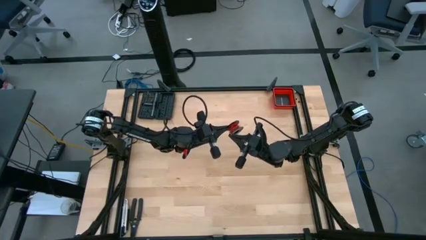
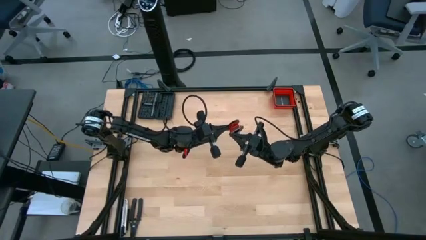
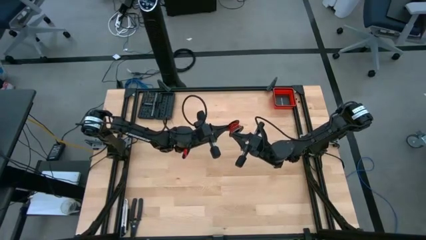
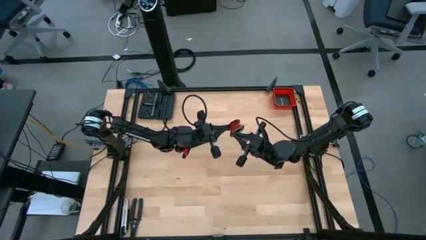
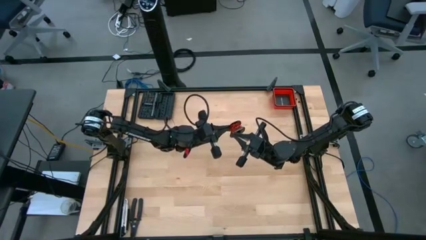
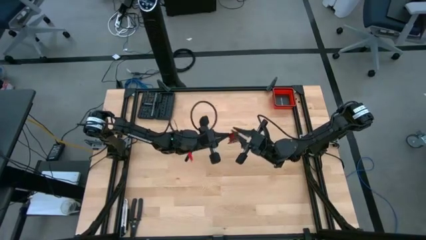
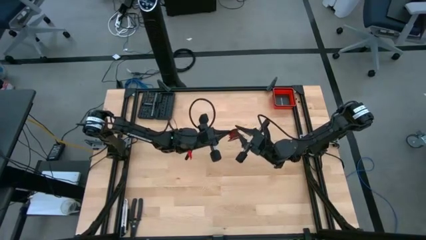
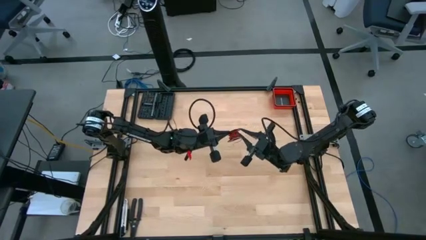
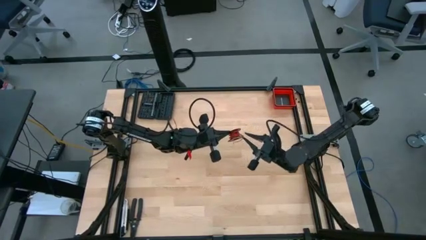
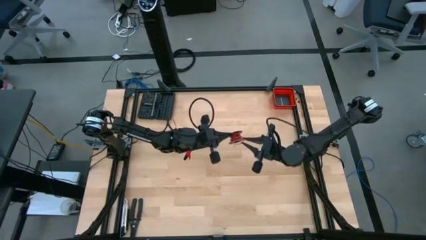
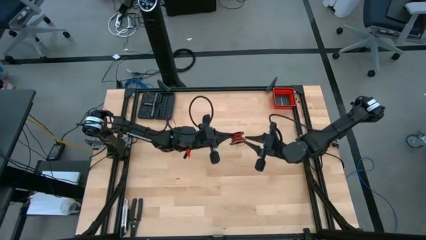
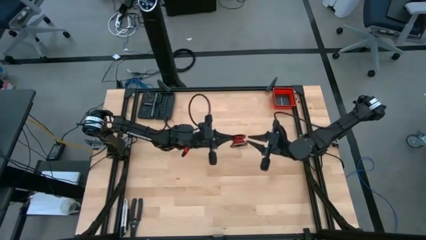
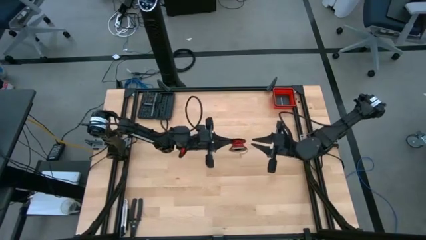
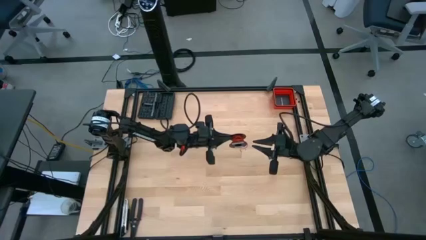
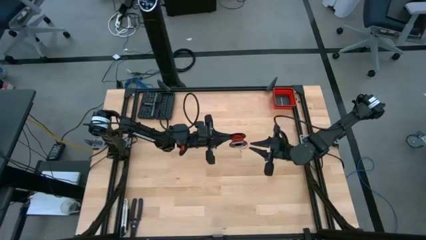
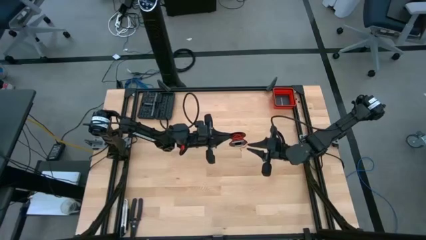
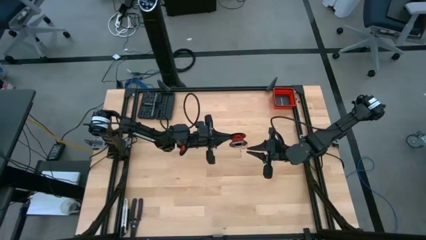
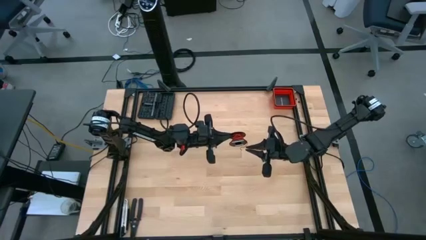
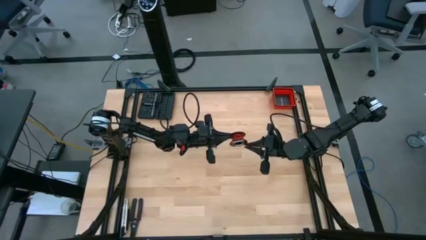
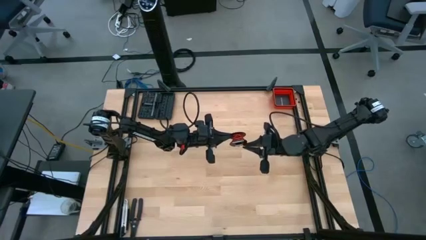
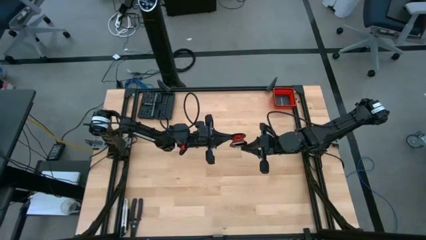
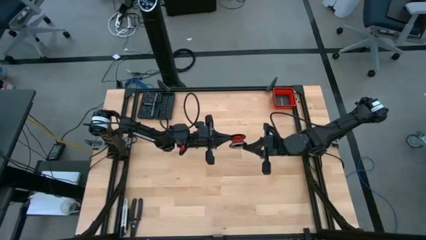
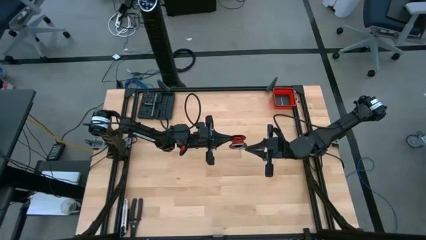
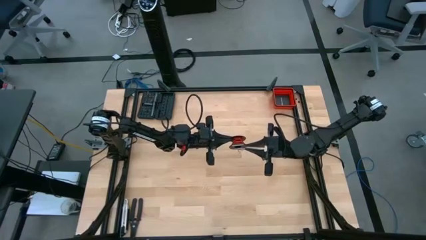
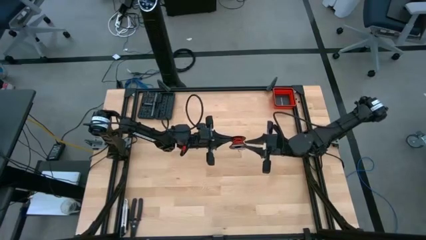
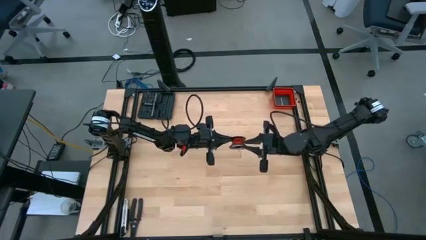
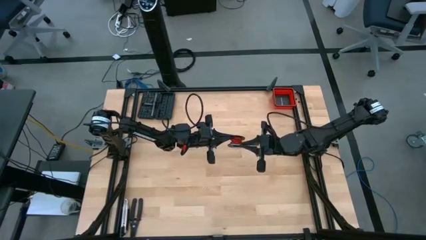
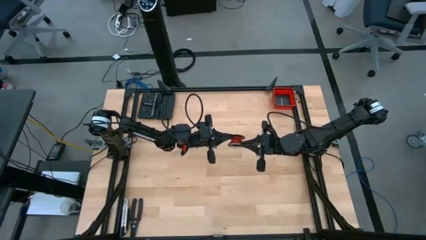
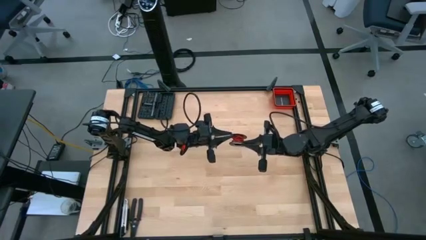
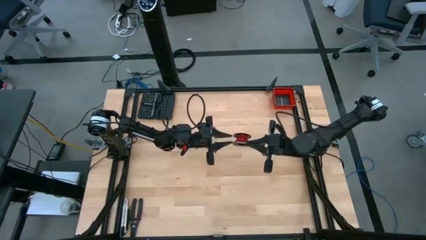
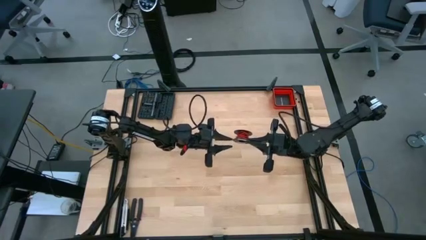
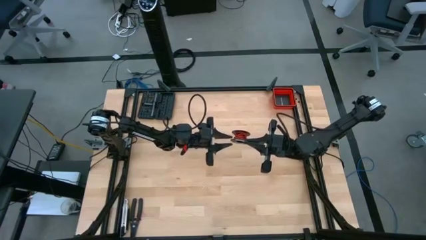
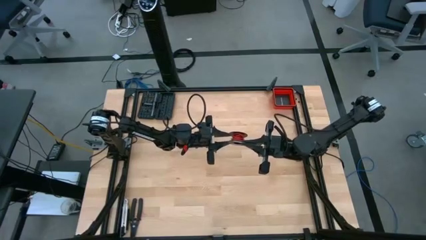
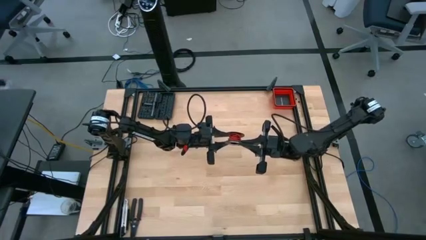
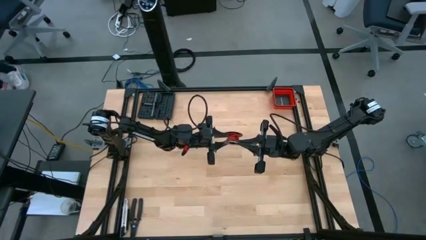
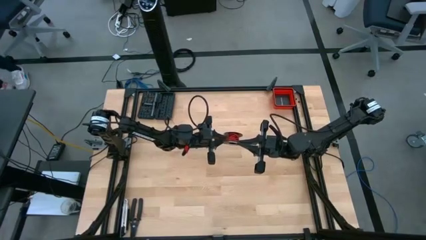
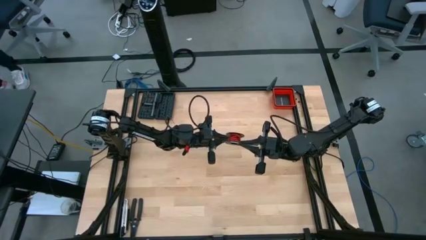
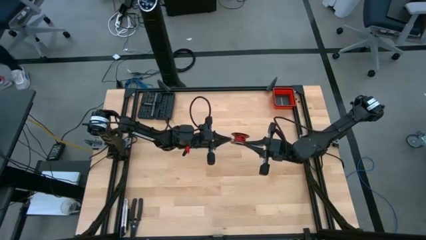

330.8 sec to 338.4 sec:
Task: Coil cords
Coil the red wire on the black spool

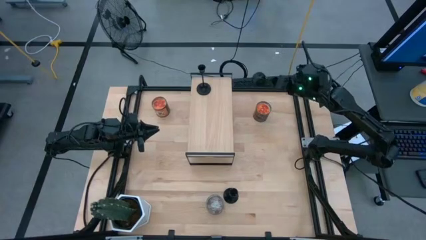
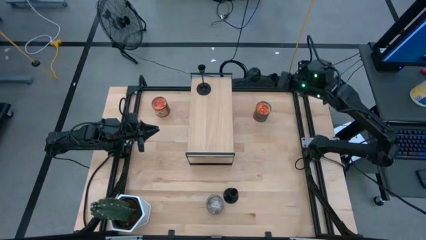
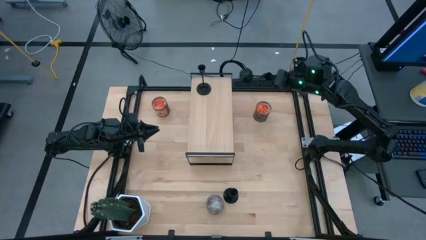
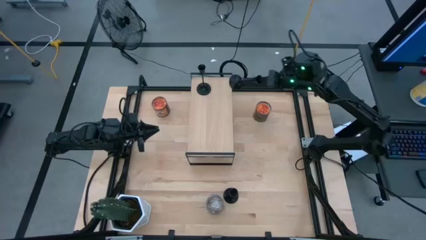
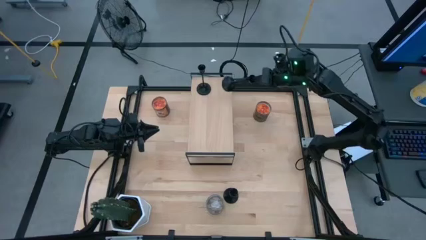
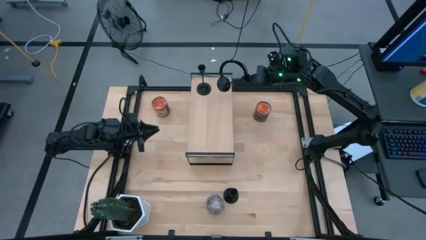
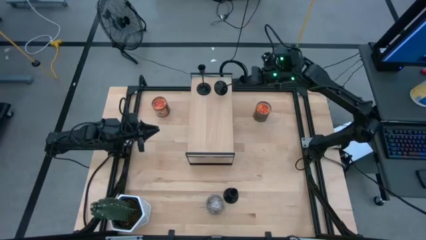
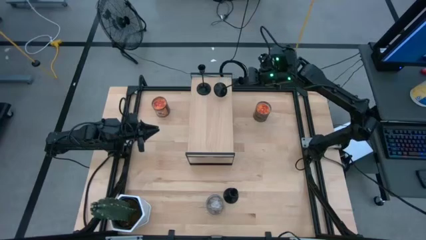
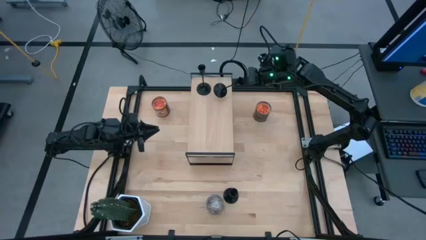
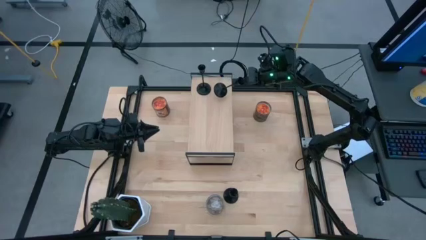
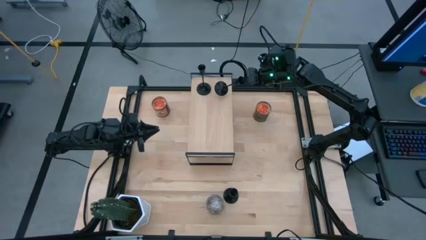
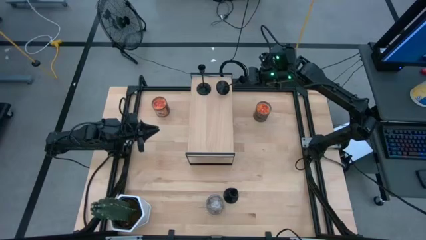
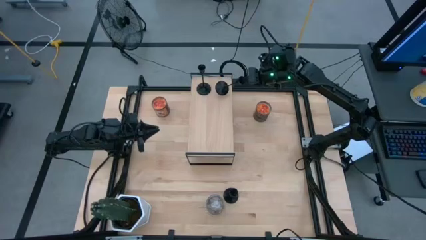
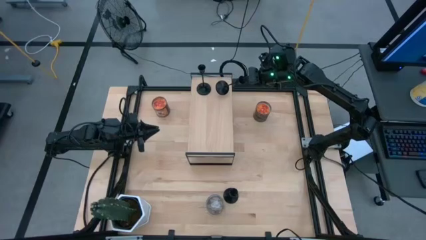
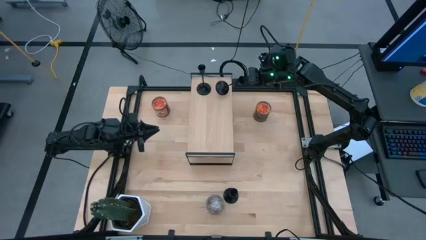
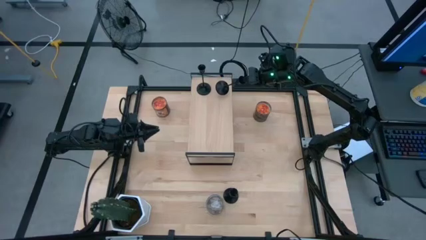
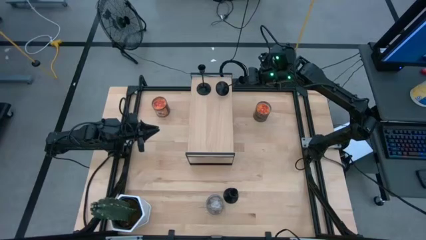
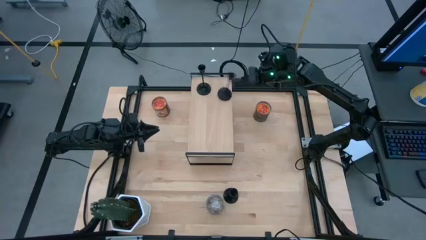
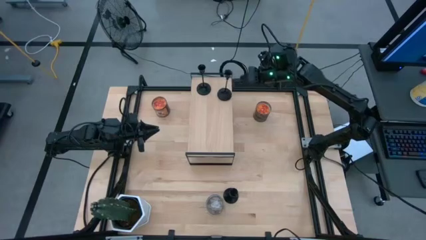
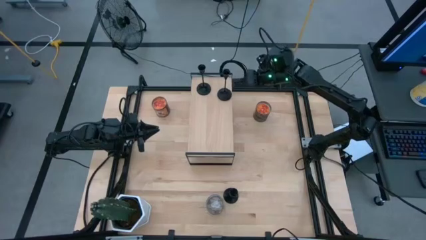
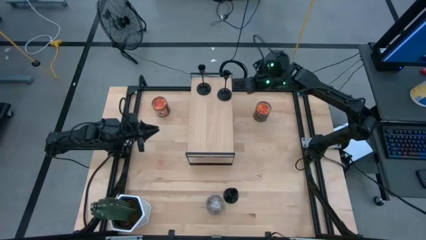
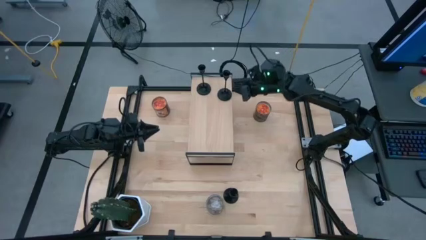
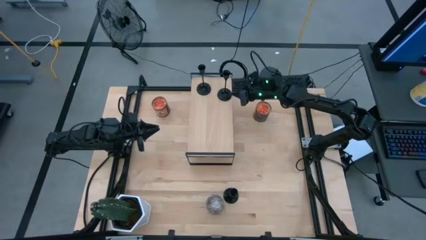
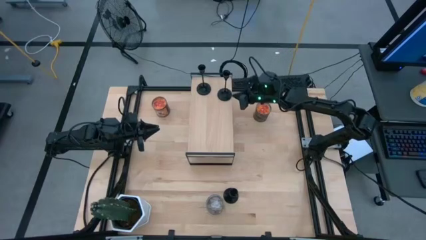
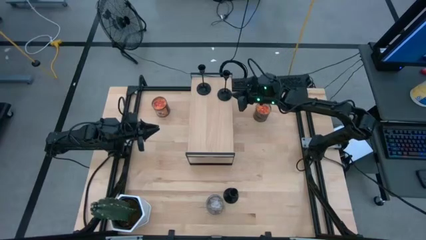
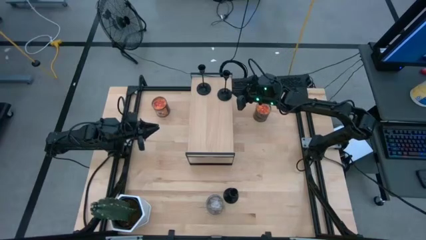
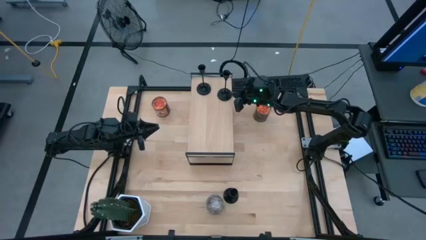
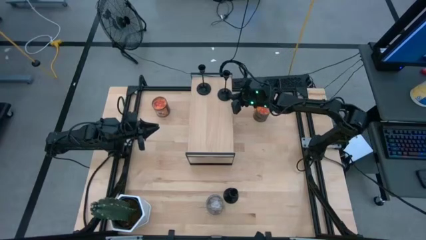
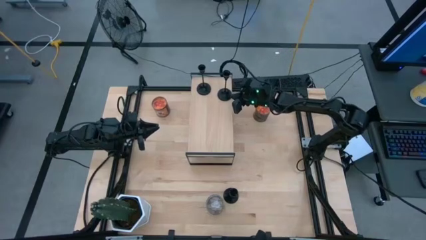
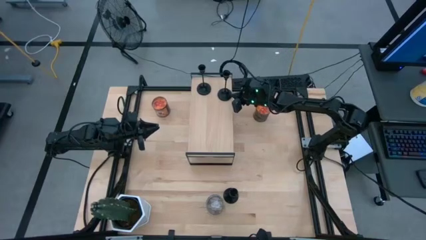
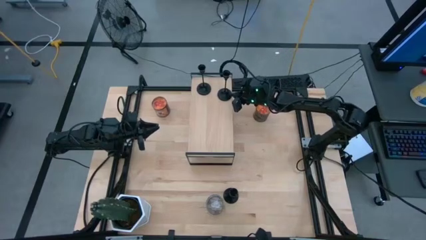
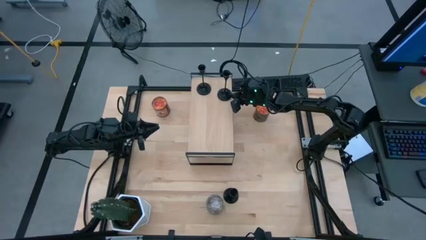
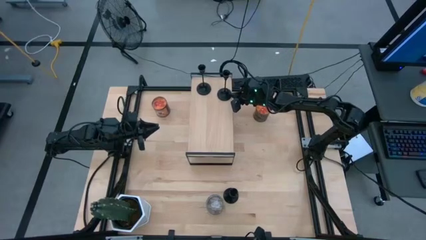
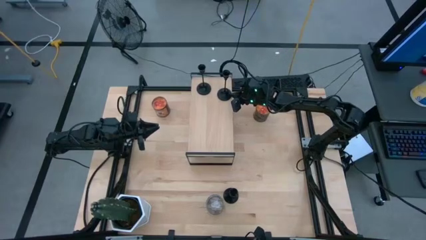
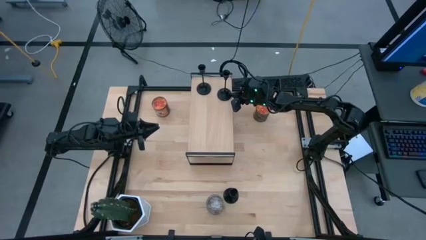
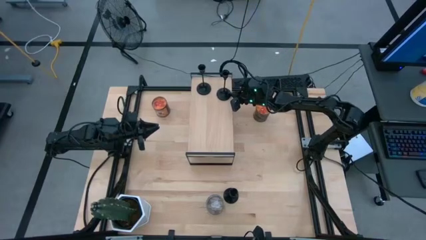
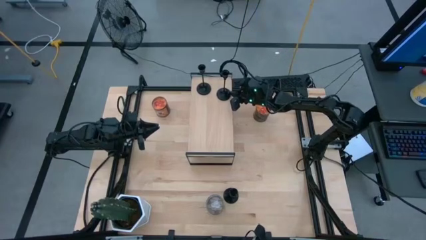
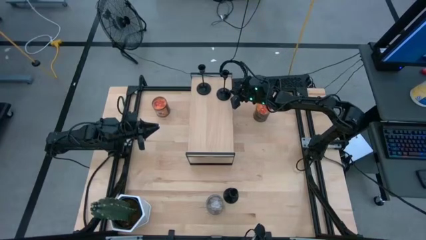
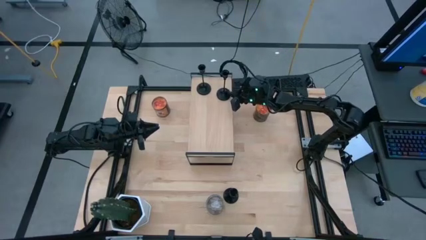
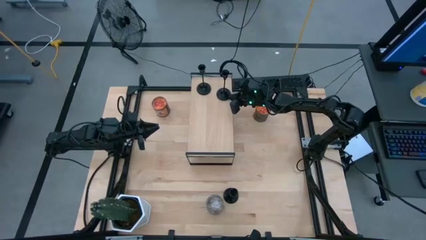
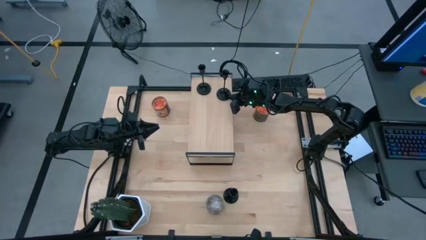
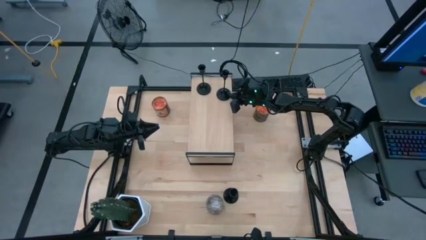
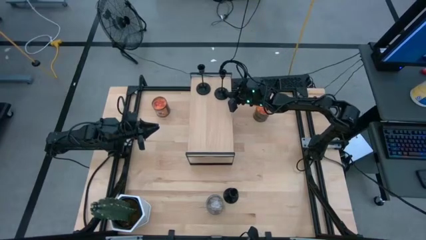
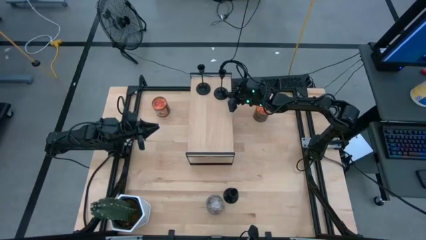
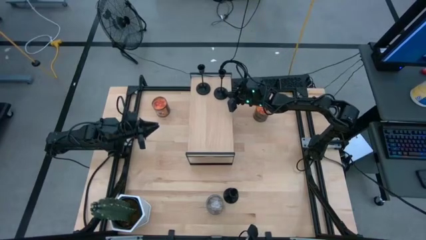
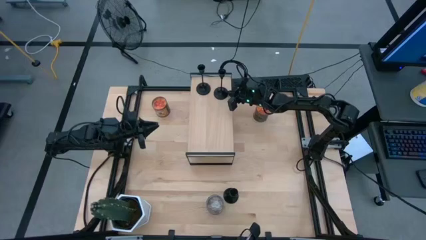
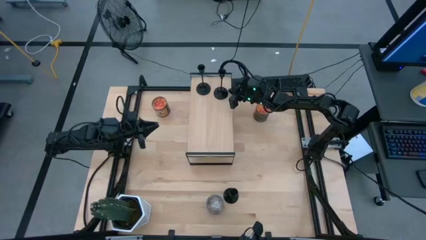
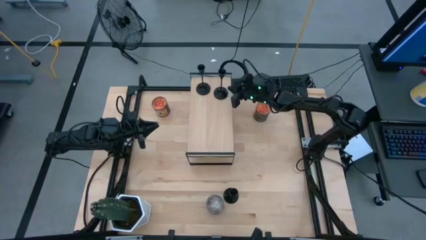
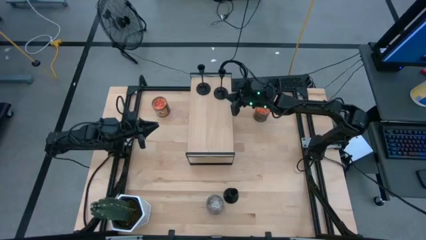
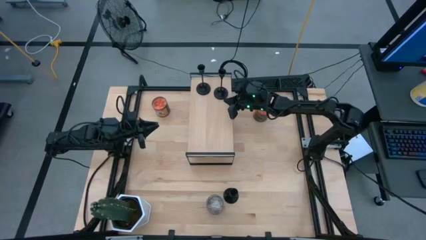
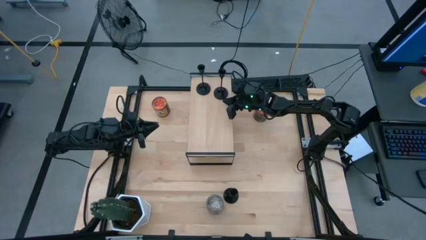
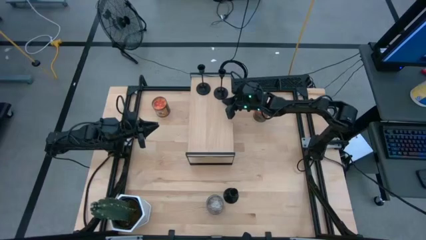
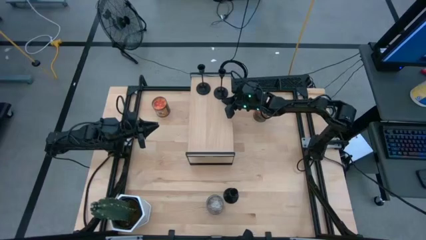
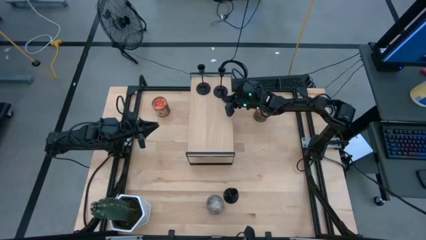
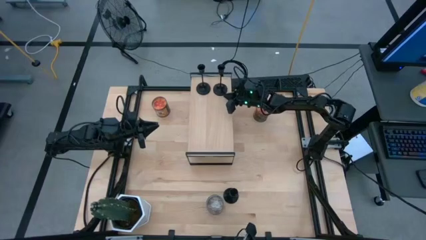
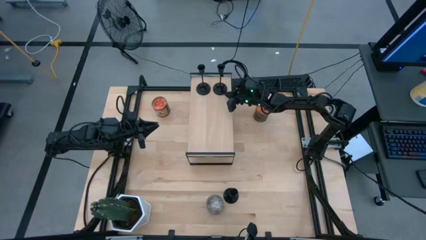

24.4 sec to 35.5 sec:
Task: Pick & Place candle stick holders
Put the top black candle holder on the shelf aligned with the other black candle holder
